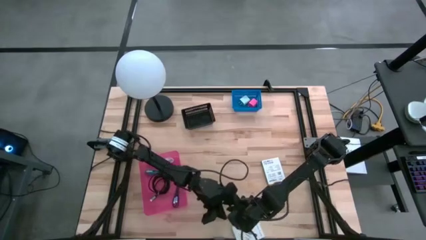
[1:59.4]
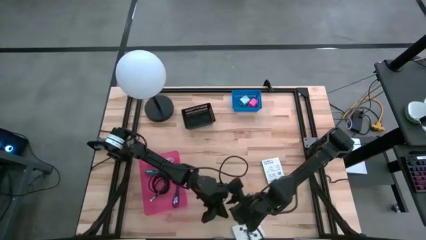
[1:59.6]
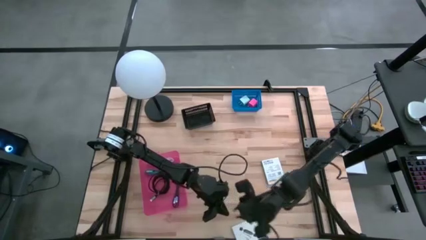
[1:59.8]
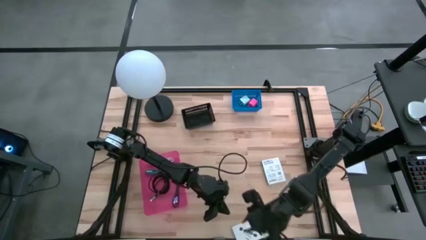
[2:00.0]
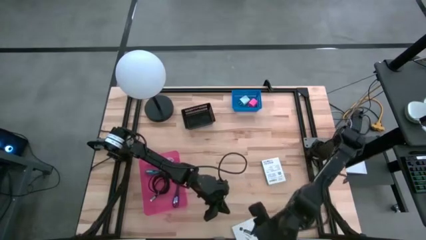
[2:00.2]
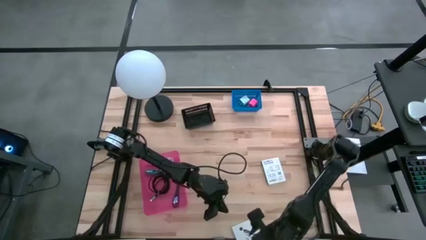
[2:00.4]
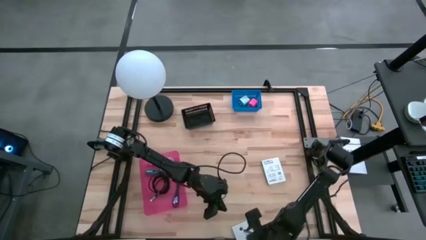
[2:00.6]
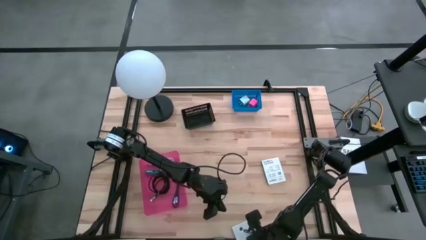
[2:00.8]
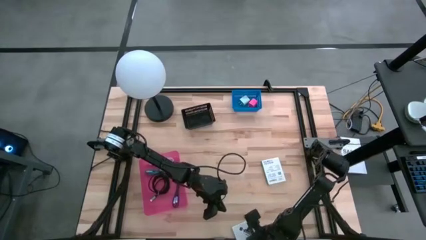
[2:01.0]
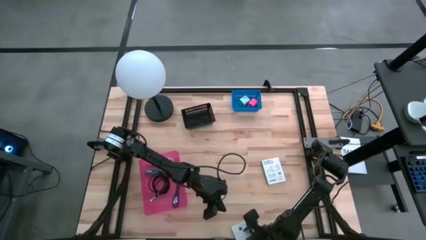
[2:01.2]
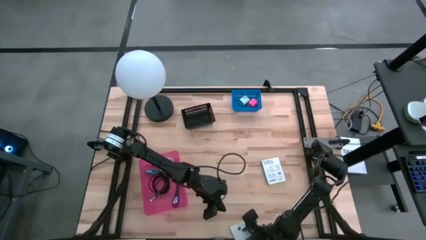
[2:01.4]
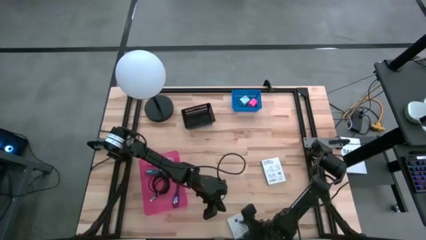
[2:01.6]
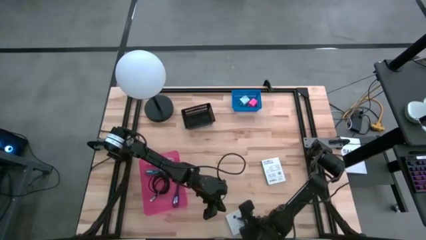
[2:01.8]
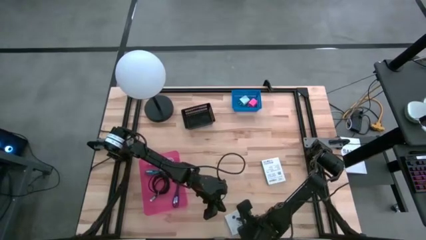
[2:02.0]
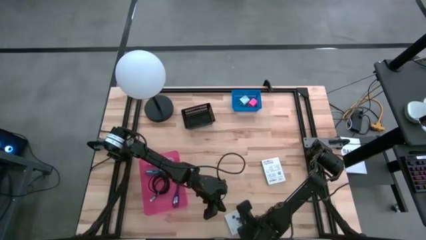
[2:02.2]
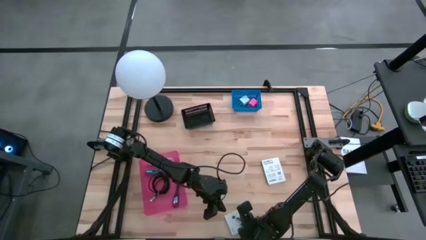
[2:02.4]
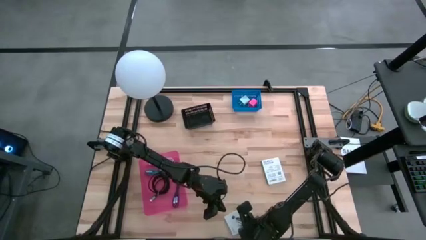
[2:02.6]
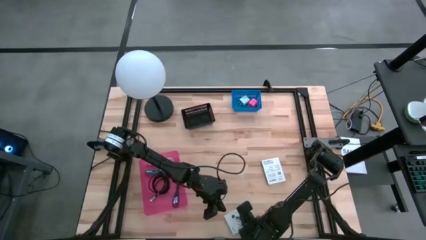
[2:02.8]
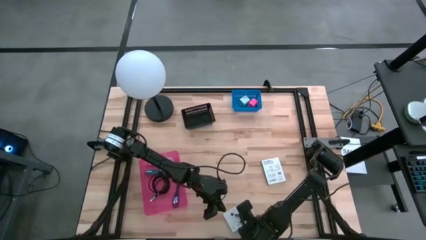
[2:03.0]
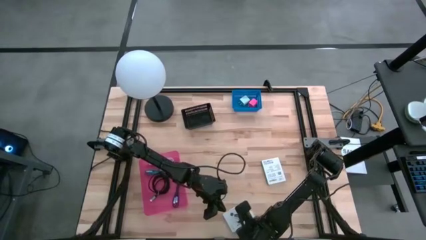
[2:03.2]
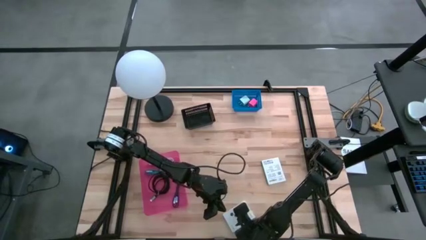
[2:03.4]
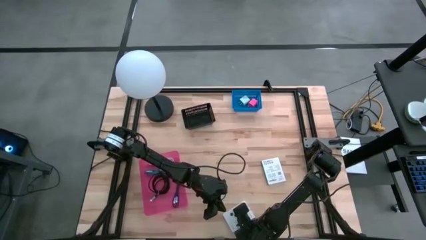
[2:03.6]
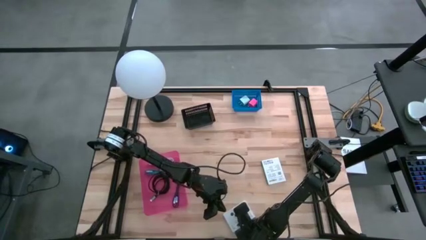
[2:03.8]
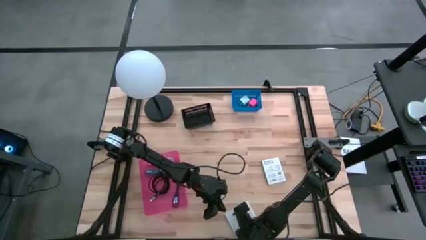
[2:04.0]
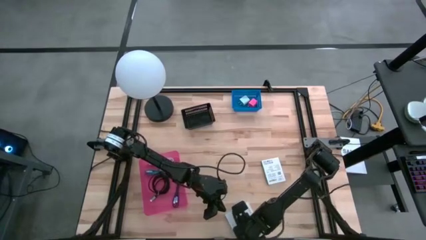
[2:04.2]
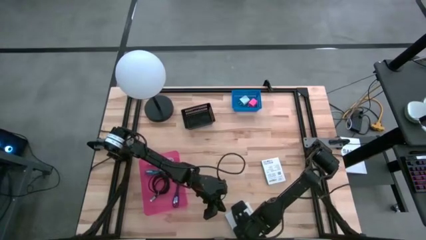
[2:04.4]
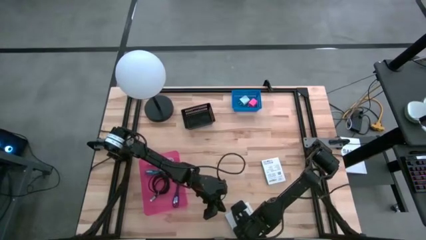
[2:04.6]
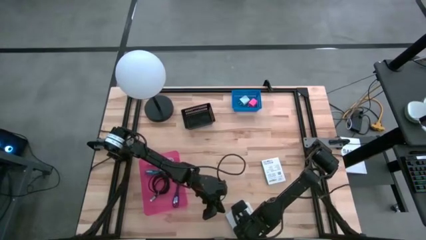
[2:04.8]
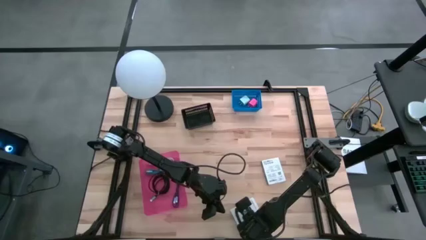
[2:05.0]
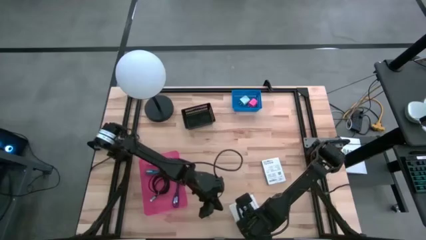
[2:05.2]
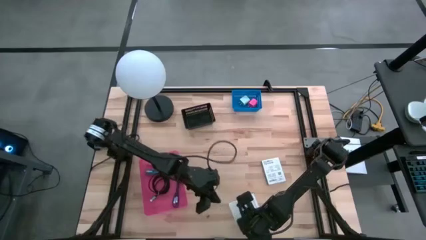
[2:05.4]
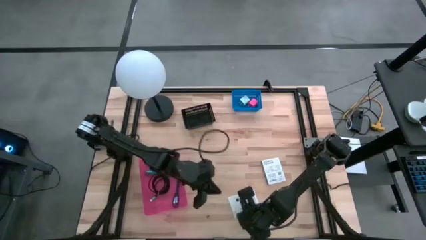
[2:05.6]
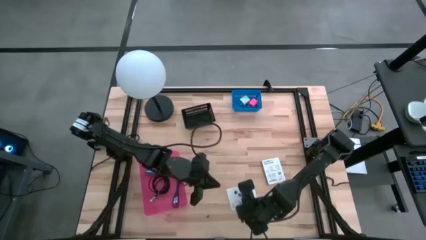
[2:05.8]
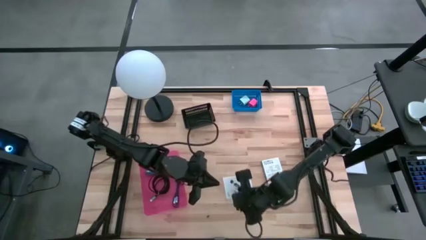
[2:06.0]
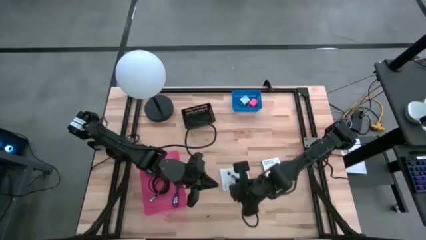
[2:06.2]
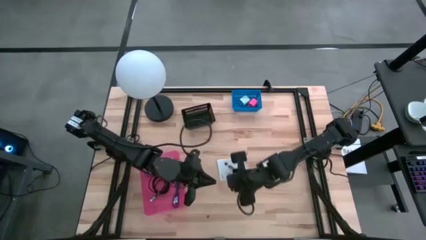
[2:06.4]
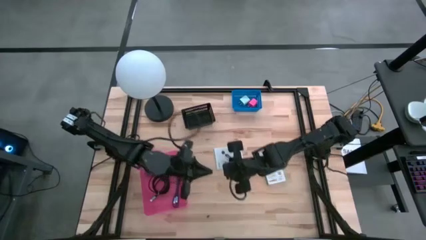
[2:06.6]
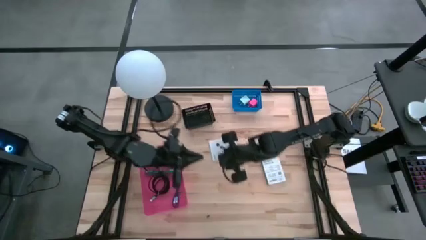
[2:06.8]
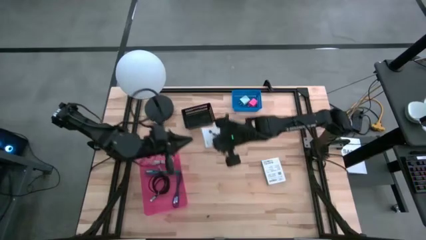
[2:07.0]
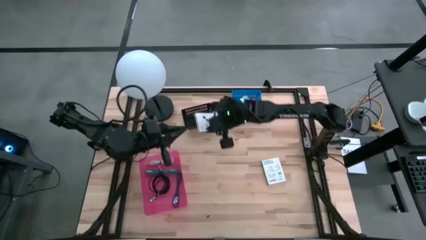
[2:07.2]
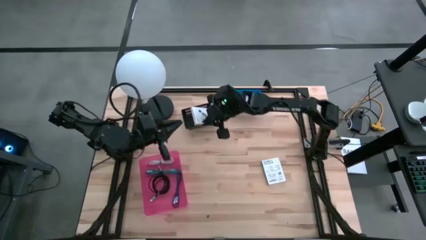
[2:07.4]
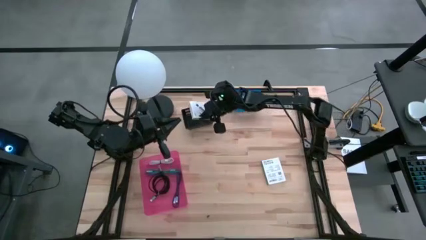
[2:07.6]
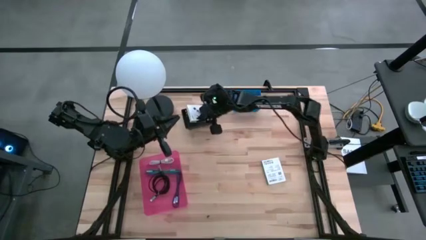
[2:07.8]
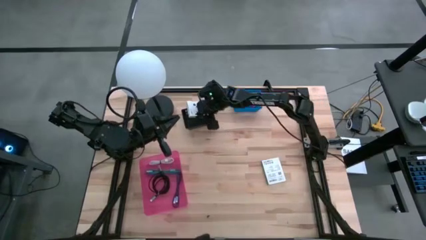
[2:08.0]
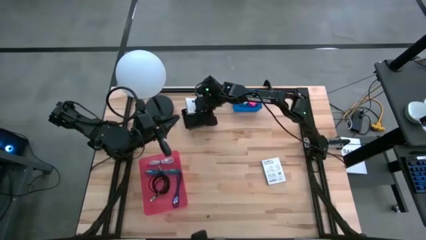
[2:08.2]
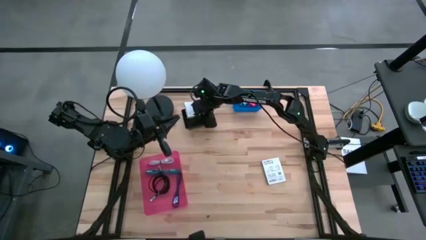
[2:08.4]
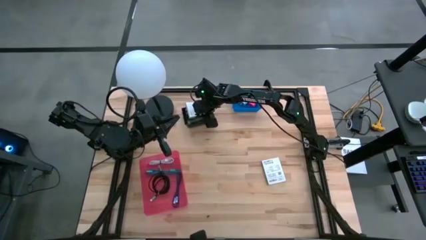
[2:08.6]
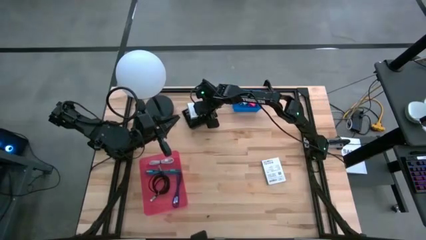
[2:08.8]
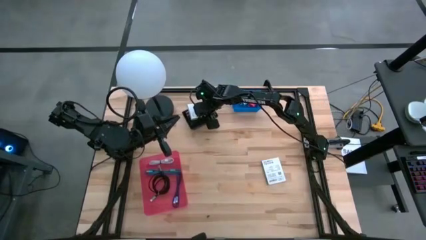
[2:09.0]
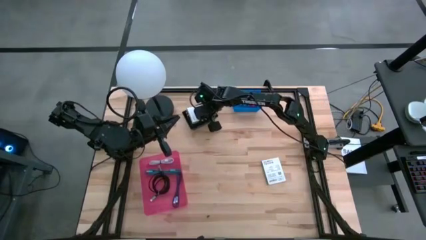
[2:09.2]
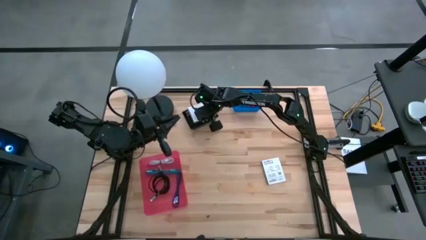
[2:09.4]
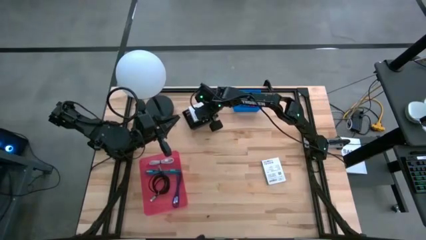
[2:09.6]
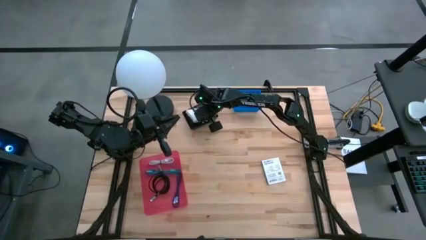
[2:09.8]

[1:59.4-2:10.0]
Task: Pick and place items into bin
Put the bottom card reader box into the black bin
